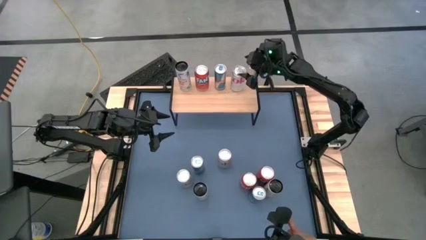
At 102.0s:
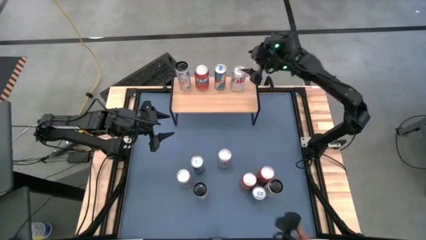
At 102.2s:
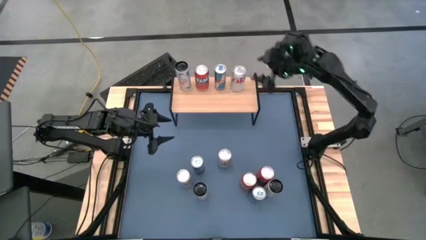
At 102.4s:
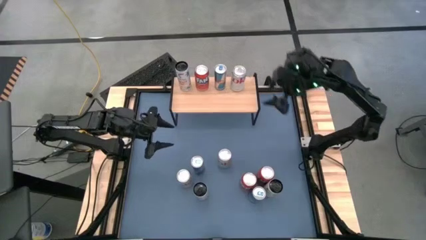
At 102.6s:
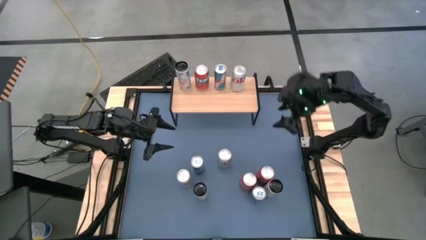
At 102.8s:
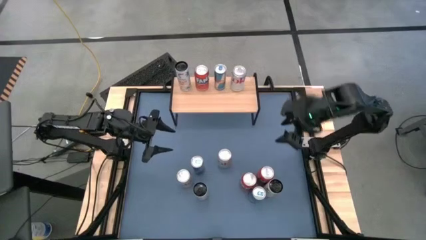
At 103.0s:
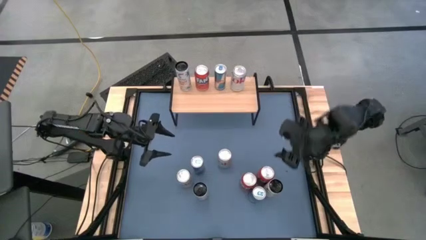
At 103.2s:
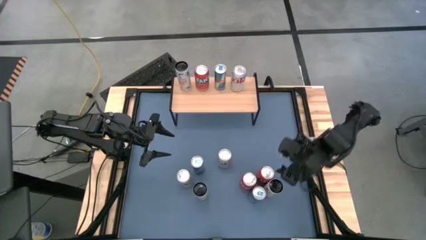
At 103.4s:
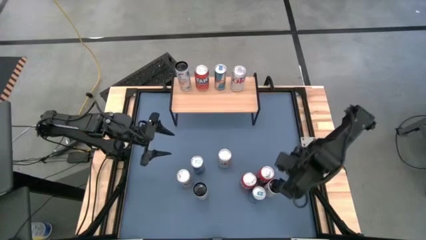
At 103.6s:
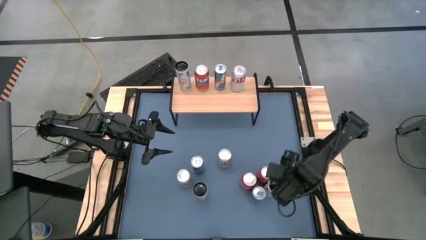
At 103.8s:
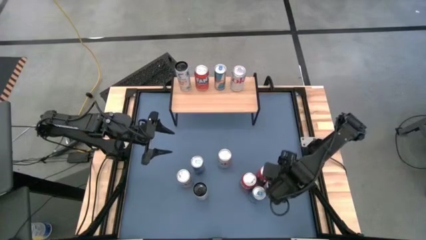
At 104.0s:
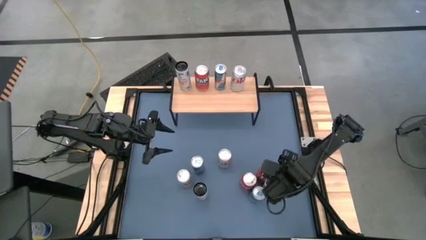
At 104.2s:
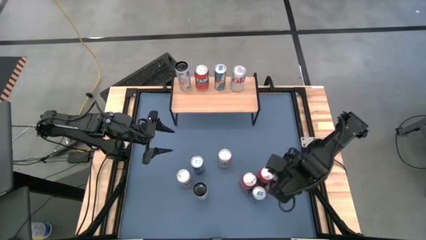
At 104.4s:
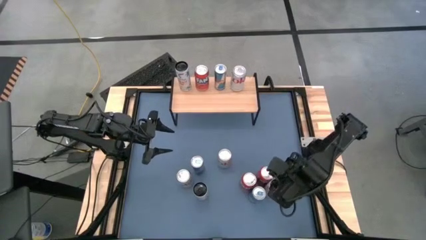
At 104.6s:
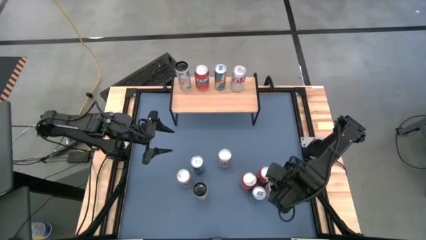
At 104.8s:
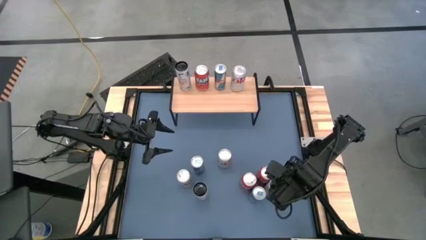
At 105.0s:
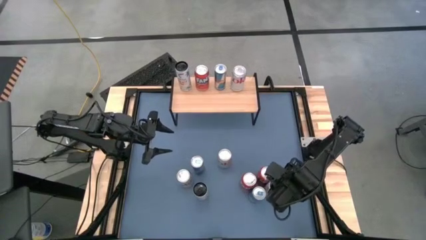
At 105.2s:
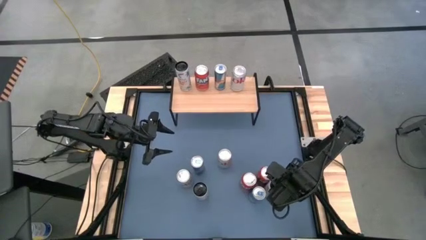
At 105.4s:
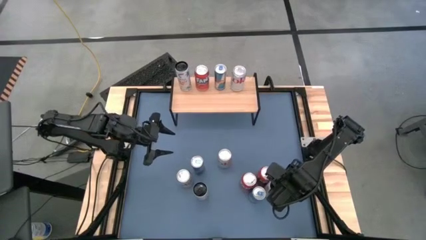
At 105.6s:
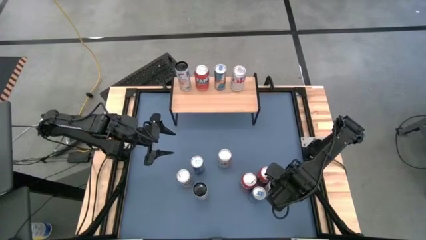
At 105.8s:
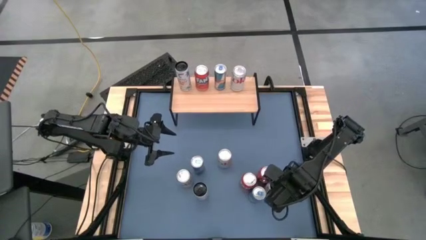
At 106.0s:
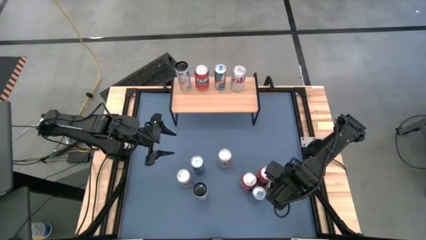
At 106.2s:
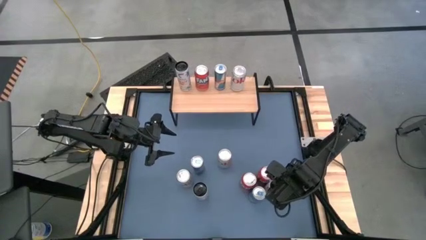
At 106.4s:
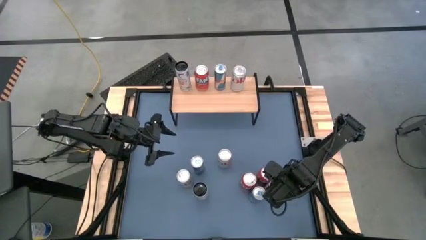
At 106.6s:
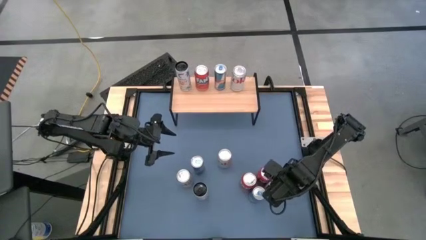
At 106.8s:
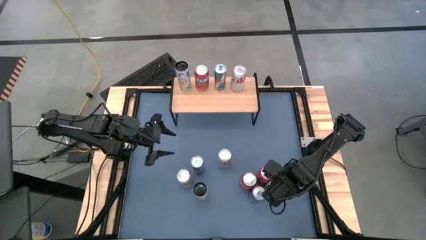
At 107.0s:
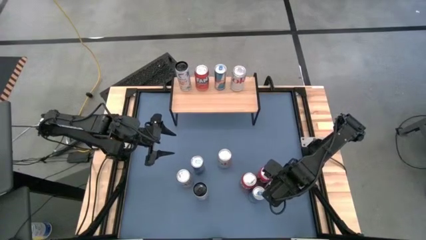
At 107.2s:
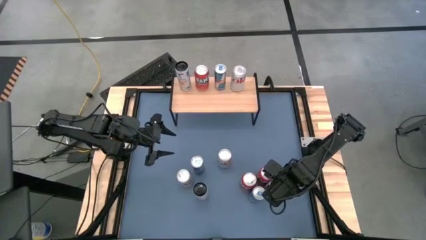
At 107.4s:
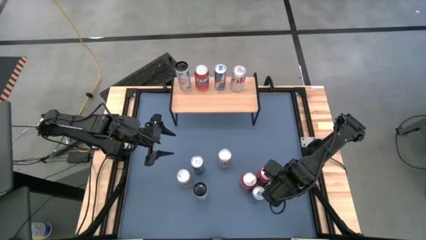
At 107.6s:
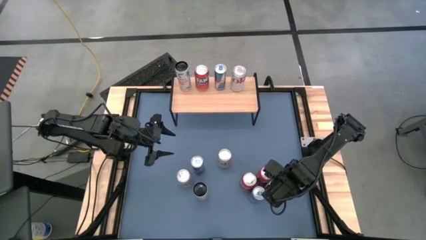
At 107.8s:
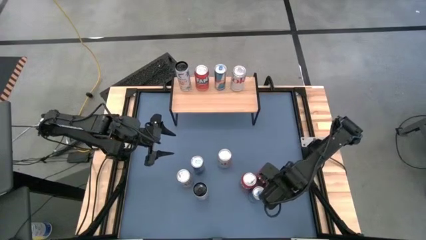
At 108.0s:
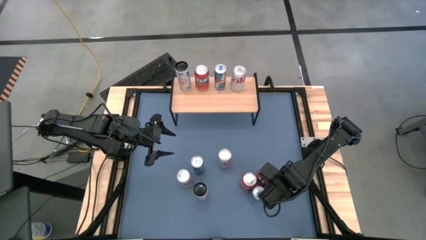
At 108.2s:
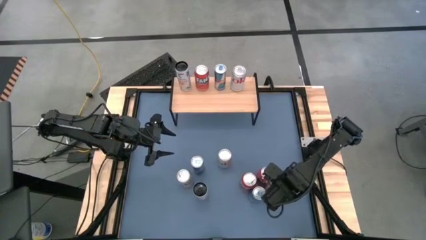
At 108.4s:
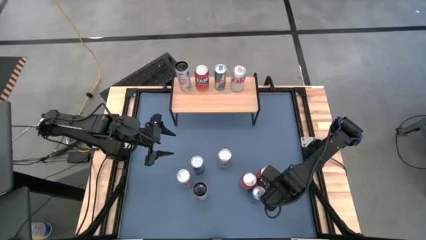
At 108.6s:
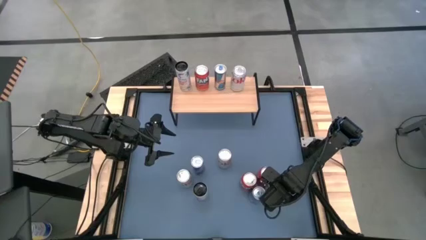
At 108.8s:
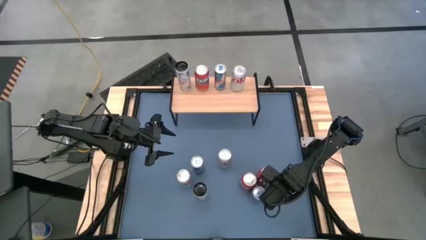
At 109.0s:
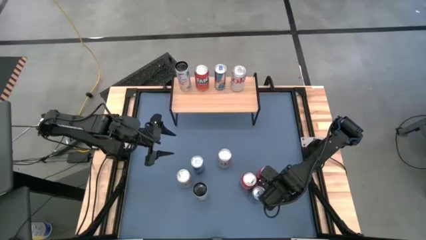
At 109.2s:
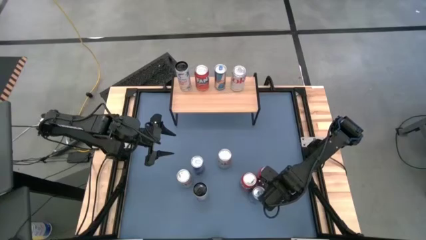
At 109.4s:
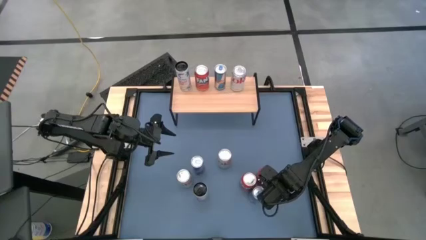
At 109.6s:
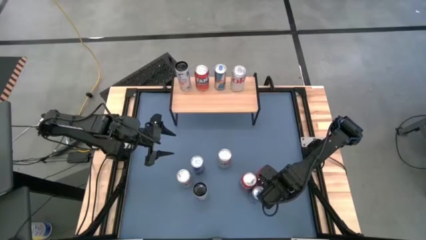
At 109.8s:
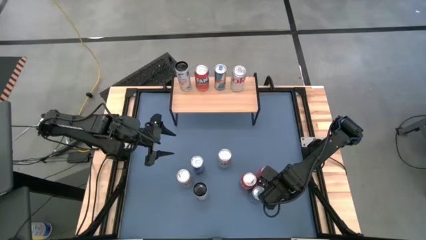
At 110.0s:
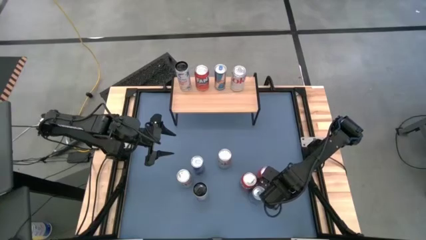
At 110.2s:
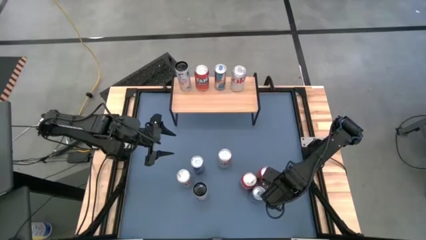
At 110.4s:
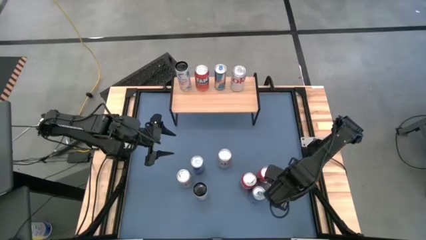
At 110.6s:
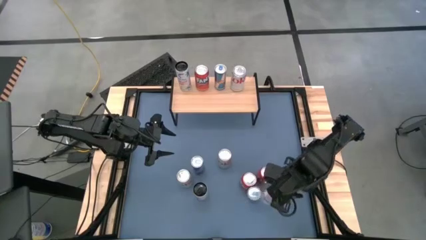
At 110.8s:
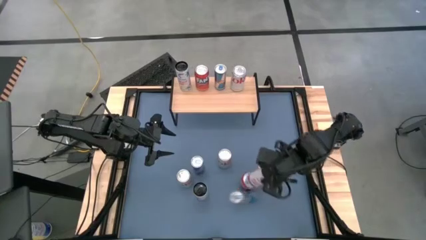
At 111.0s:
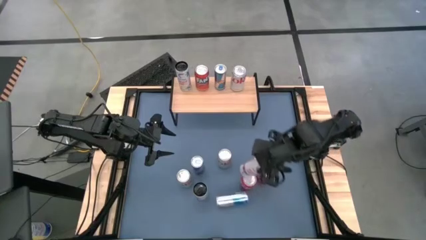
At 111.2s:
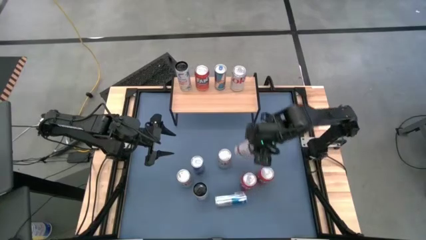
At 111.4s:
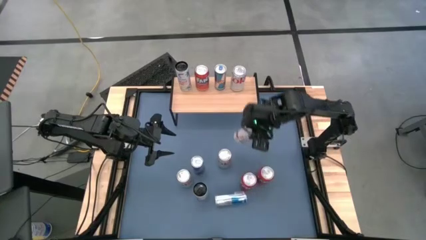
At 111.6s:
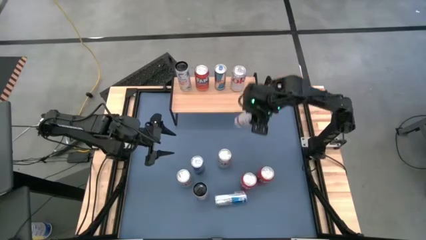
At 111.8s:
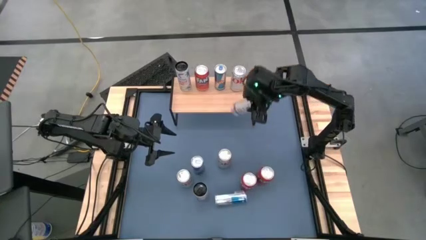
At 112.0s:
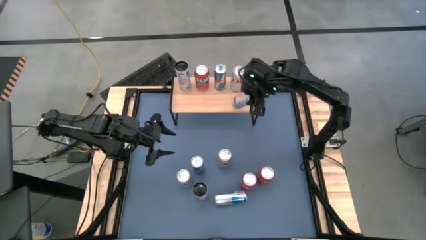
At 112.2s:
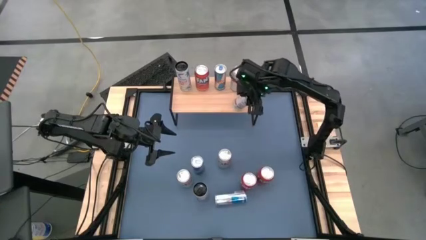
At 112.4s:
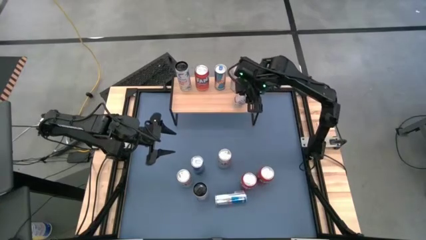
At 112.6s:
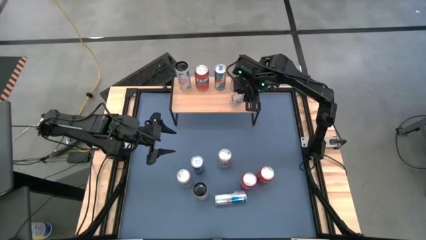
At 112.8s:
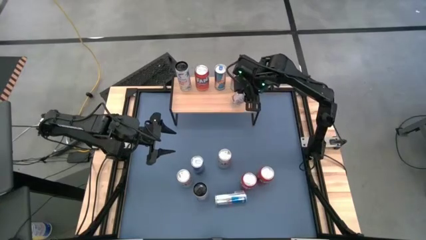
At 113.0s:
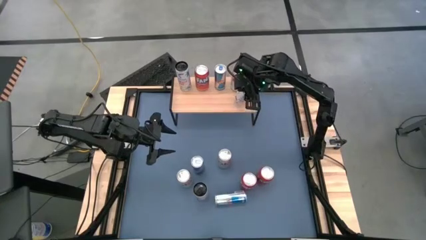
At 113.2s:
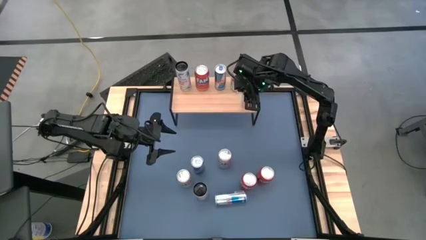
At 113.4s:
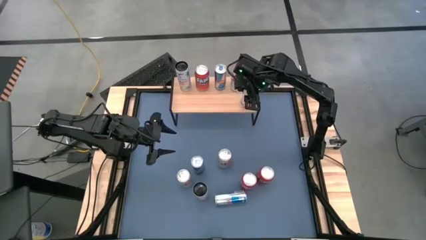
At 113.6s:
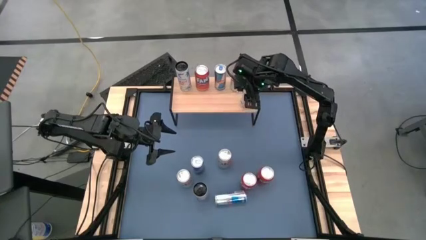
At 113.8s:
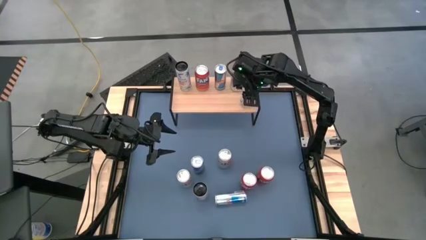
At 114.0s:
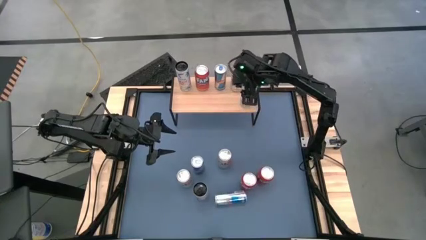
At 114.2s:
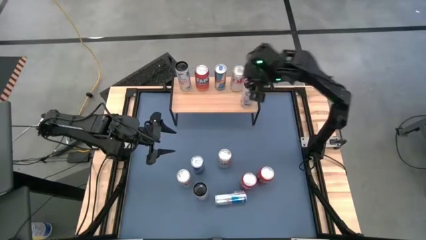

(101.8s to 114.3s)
Task: Place canned beverage on shelf
Put the right black soda can on the shelf

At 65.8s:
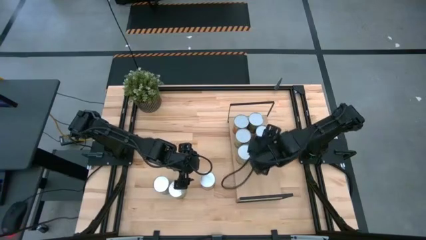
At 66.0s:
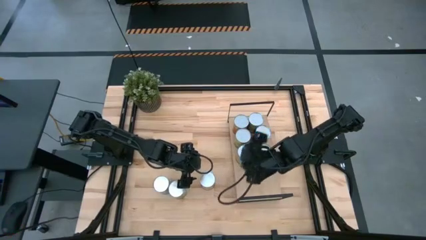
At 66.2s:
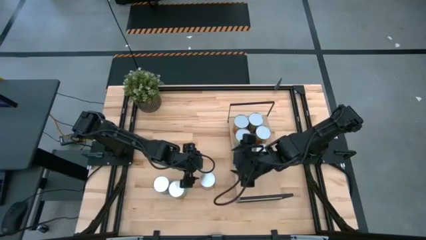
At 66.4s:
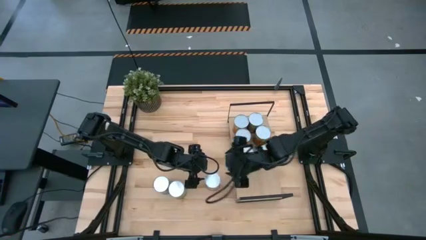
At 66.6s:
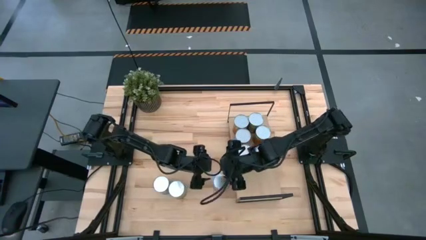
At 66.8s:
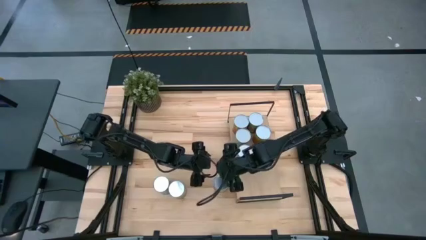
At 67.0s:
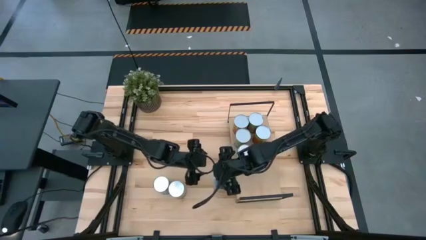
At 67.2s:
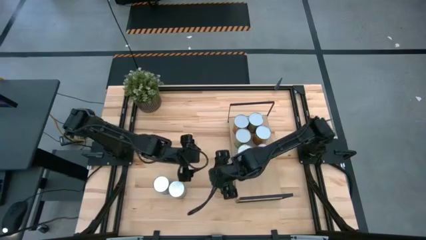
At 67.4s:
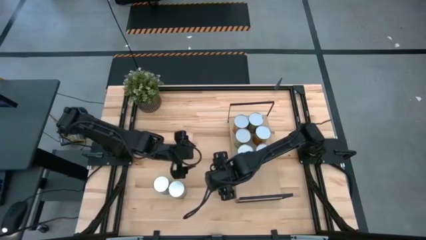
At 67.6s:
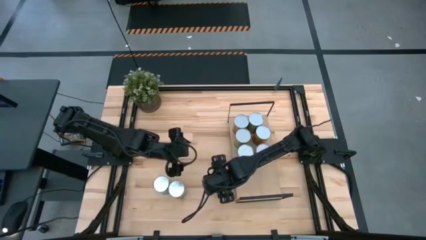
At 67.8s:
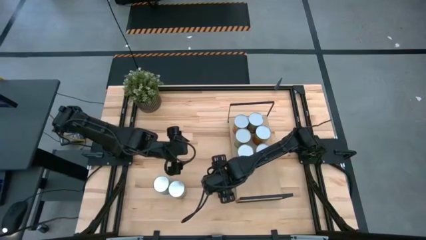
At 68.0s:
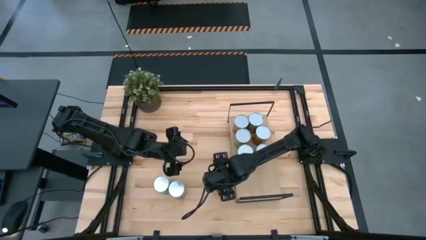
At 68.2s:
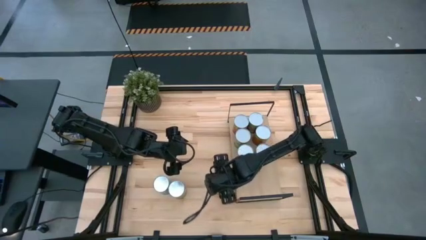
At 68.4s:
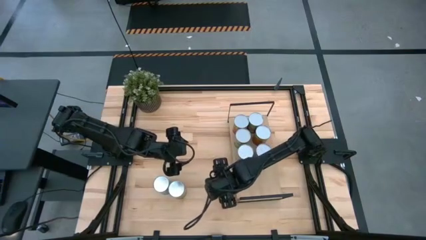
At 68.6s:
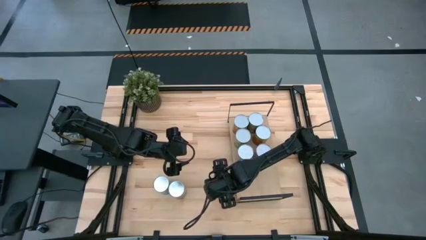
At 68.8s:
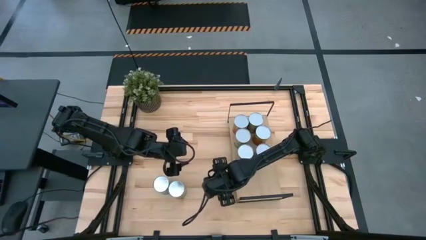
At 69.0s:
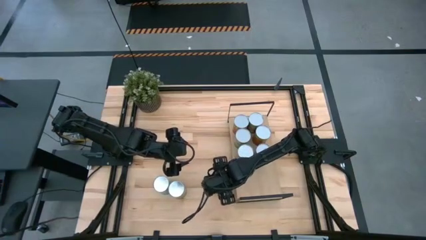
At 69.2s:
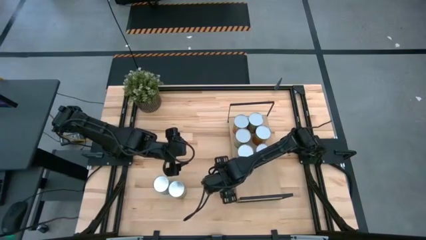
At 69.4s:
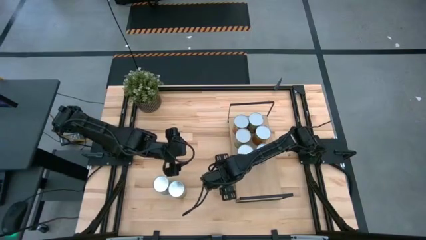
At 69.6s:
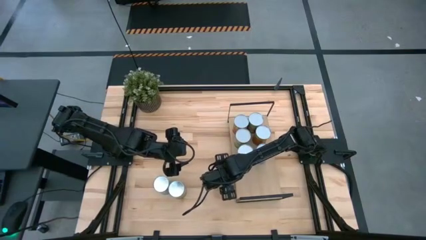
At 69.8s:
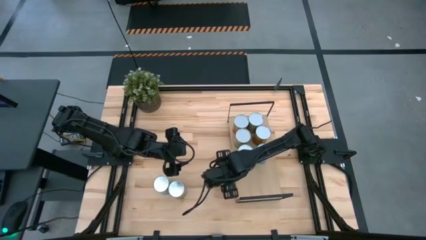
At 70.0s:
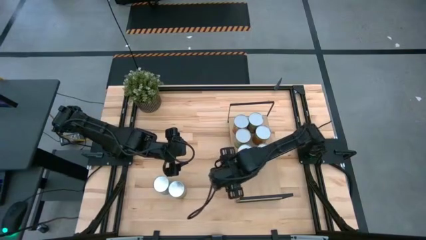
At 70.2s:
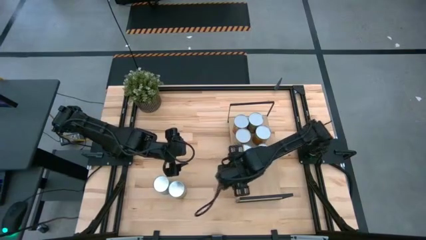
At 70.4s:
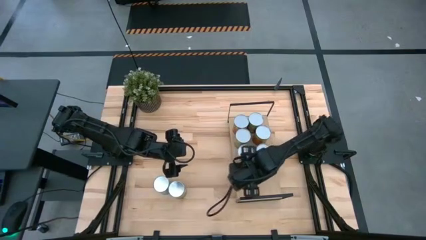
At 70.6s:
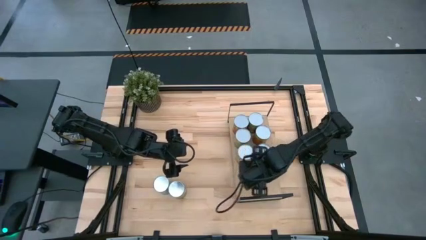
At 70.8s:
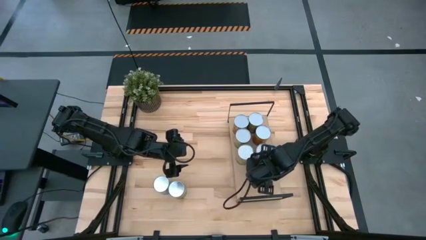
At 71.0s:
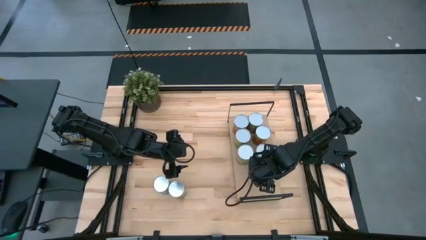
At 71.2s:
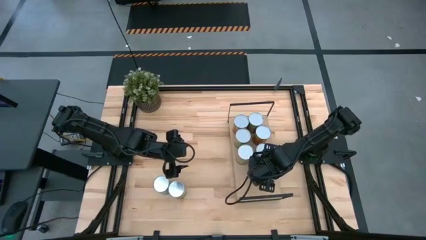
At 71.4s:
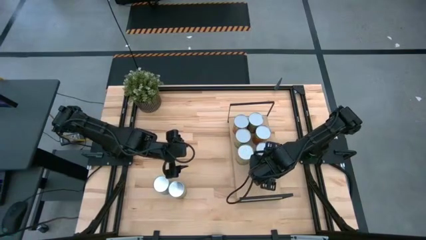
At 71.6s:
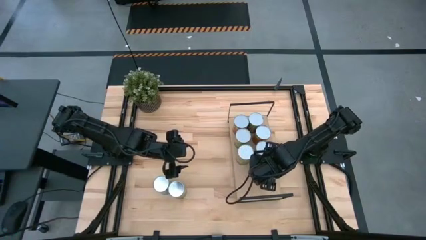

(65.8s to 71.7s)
Task: Pick and place cans onto a shelf
Put the canned corn on the shelf
